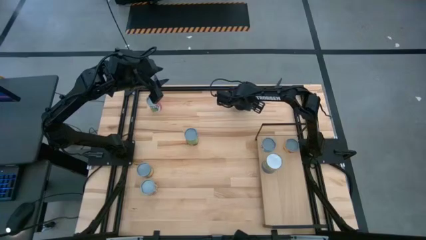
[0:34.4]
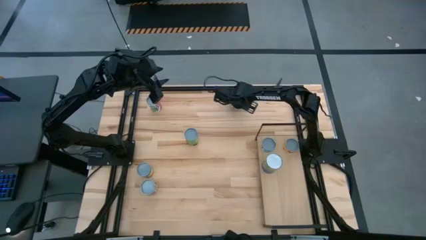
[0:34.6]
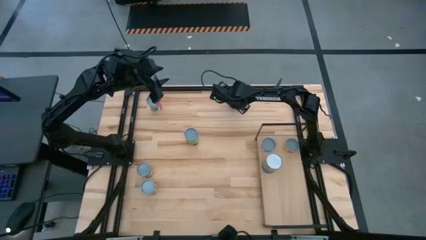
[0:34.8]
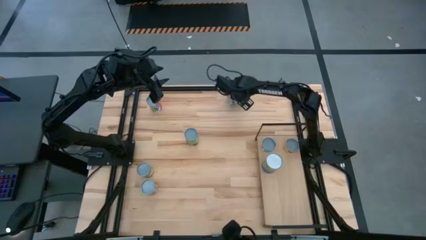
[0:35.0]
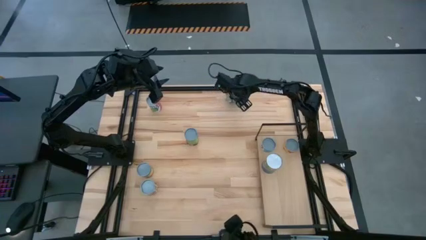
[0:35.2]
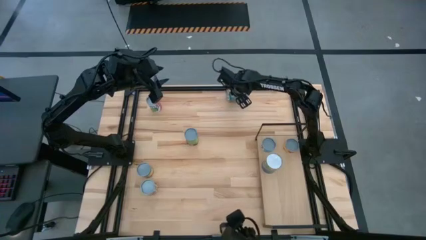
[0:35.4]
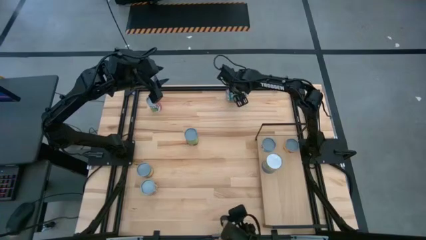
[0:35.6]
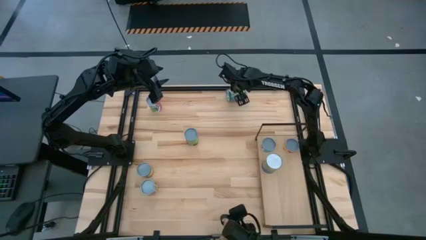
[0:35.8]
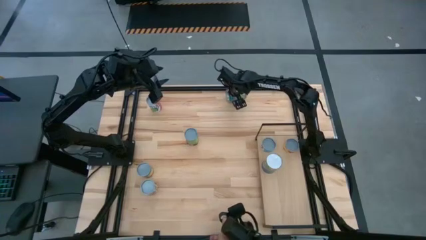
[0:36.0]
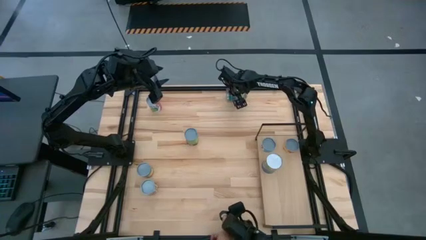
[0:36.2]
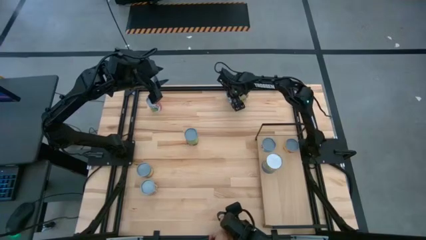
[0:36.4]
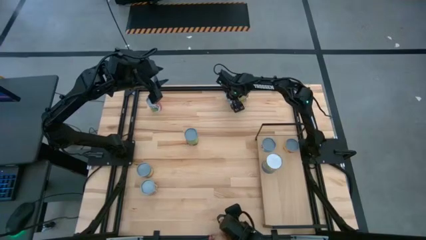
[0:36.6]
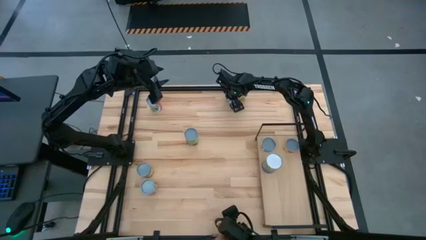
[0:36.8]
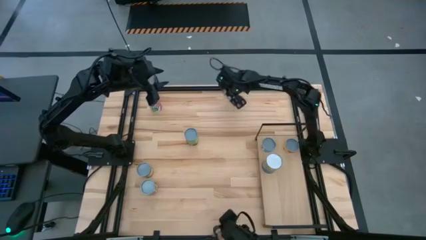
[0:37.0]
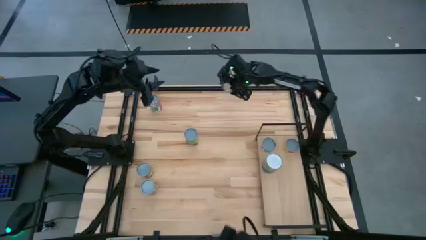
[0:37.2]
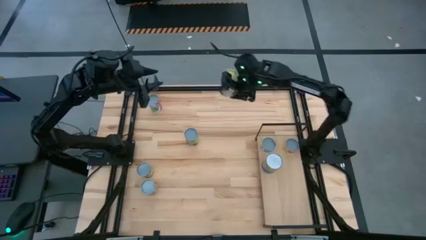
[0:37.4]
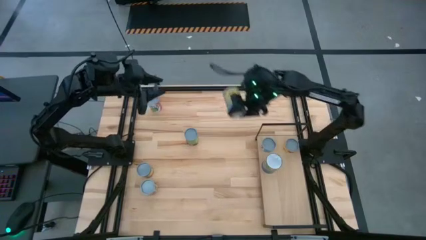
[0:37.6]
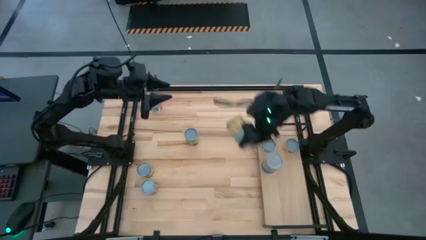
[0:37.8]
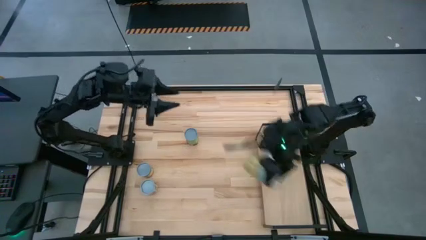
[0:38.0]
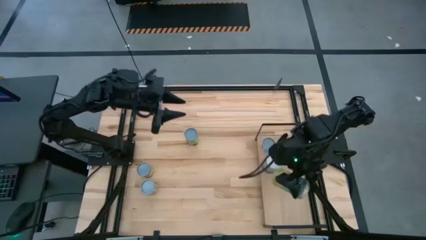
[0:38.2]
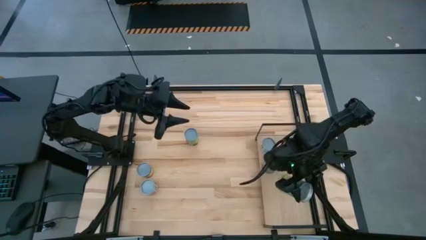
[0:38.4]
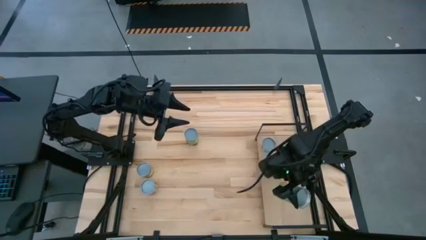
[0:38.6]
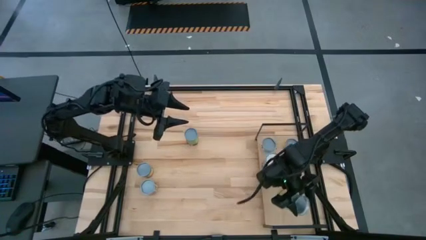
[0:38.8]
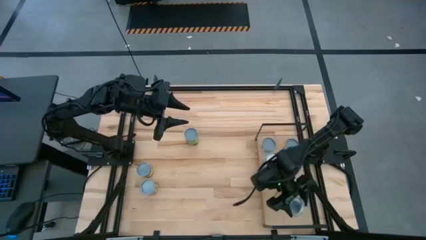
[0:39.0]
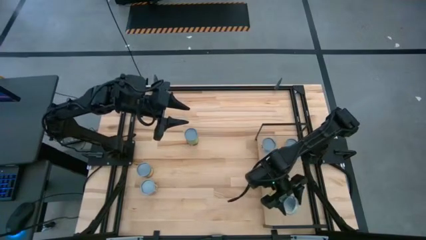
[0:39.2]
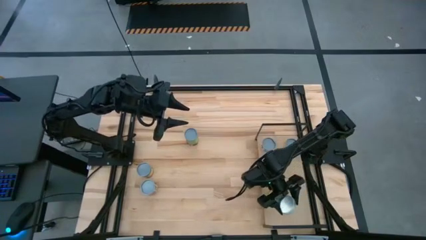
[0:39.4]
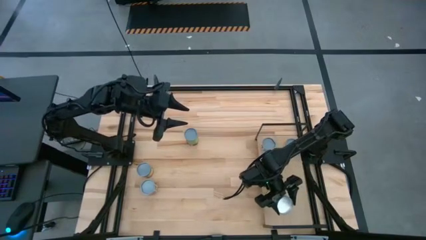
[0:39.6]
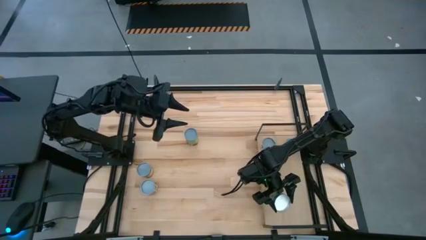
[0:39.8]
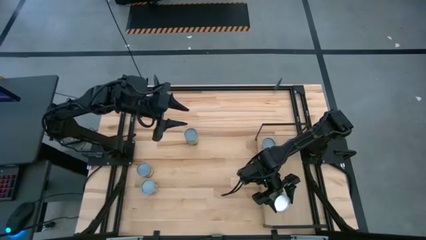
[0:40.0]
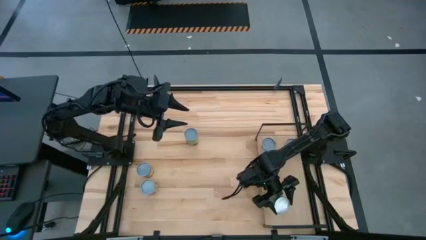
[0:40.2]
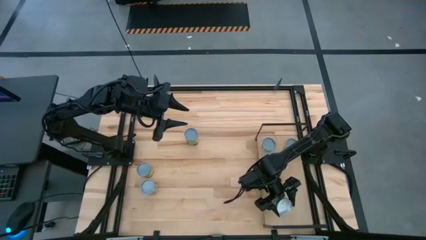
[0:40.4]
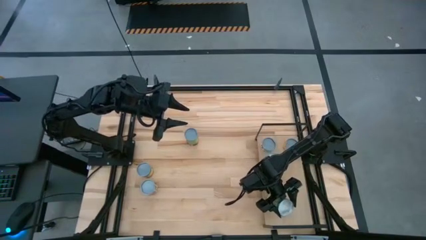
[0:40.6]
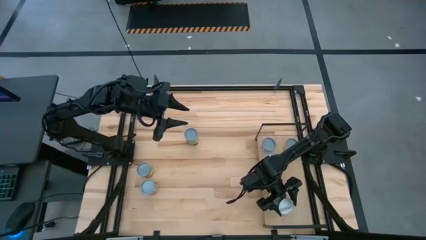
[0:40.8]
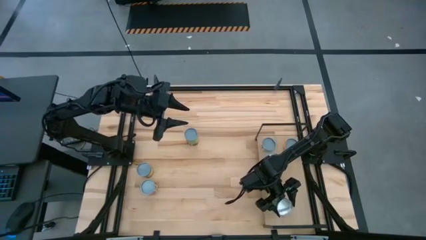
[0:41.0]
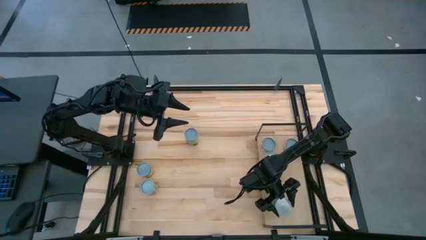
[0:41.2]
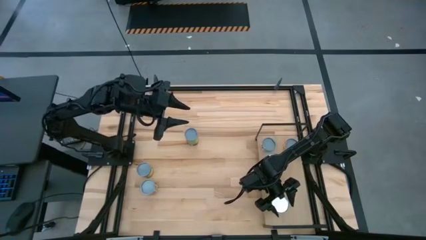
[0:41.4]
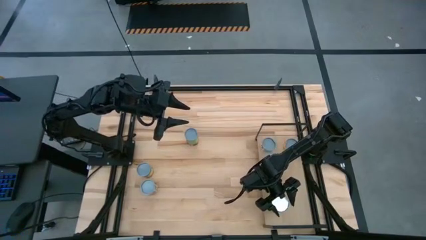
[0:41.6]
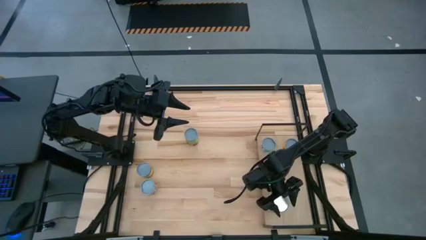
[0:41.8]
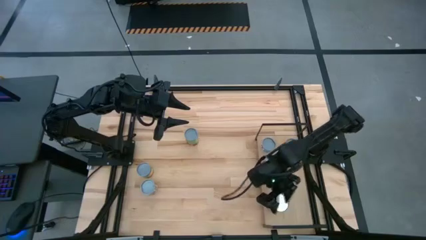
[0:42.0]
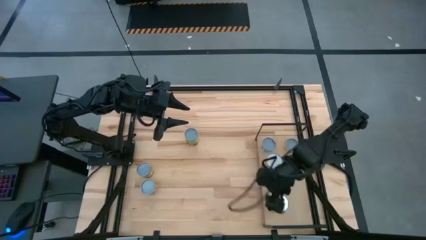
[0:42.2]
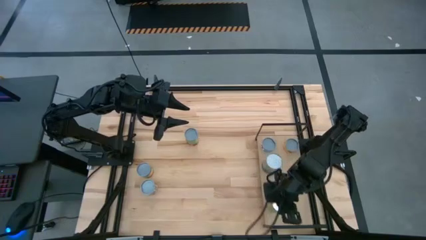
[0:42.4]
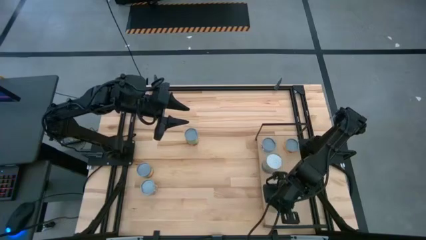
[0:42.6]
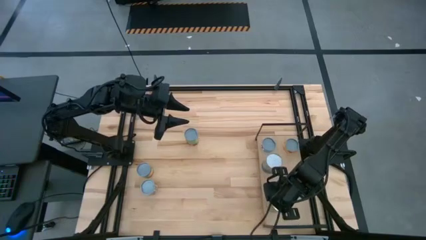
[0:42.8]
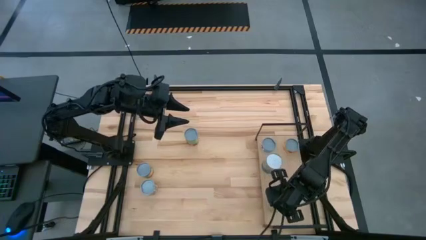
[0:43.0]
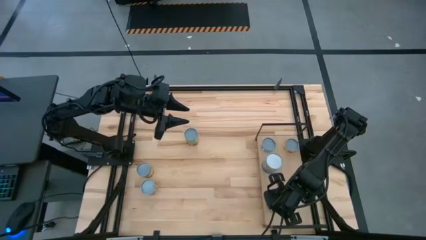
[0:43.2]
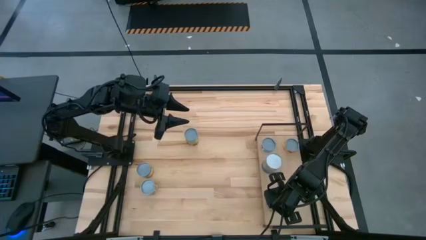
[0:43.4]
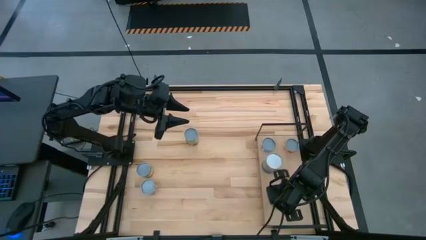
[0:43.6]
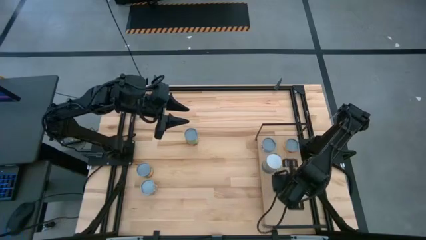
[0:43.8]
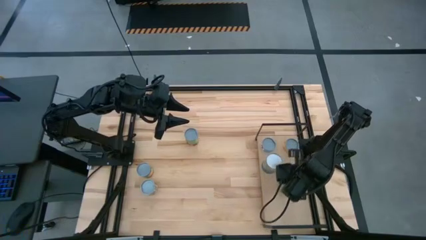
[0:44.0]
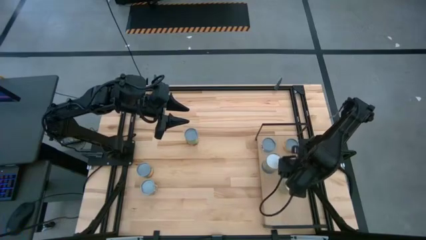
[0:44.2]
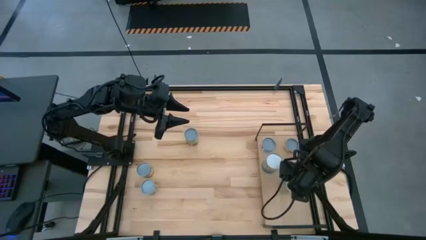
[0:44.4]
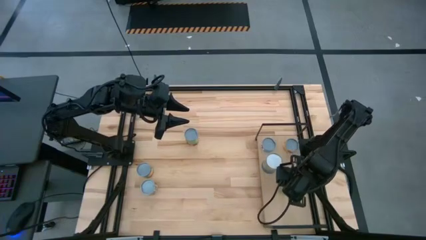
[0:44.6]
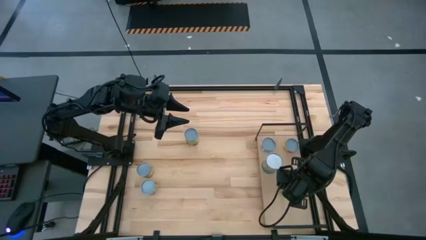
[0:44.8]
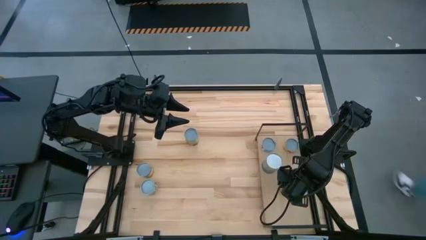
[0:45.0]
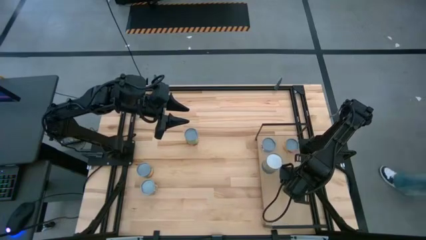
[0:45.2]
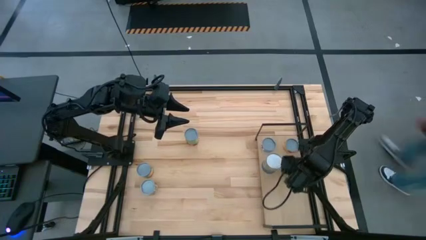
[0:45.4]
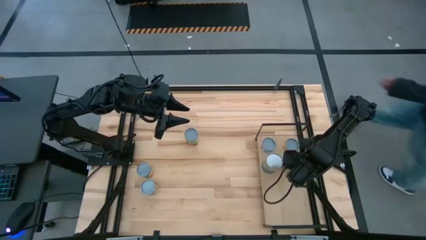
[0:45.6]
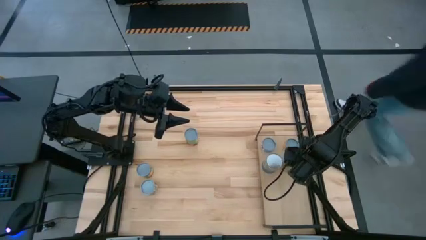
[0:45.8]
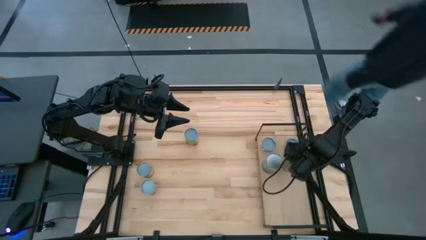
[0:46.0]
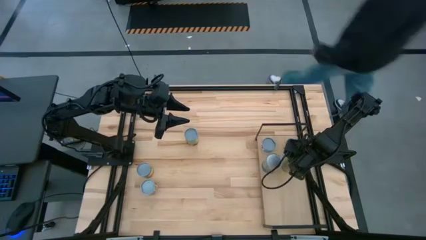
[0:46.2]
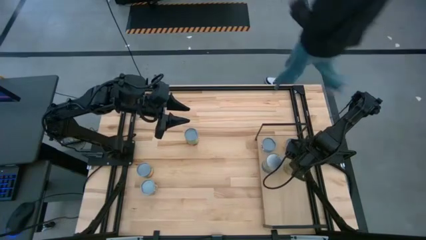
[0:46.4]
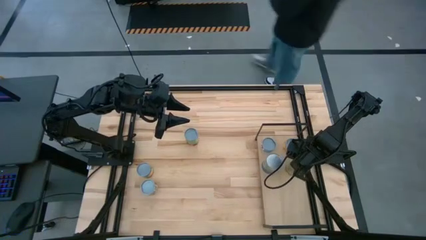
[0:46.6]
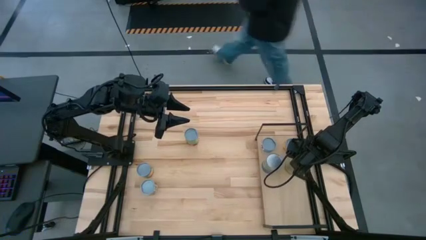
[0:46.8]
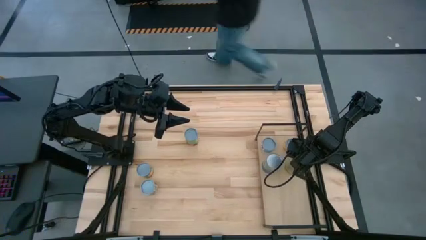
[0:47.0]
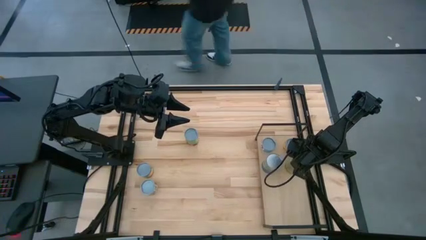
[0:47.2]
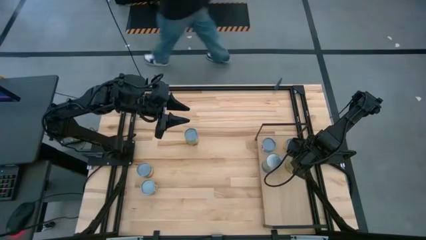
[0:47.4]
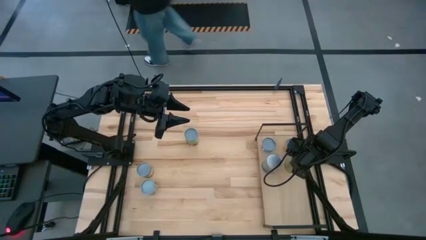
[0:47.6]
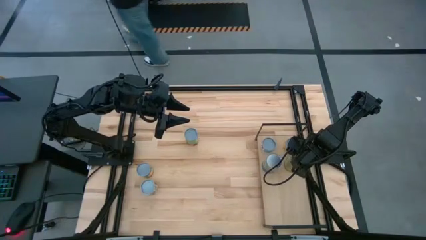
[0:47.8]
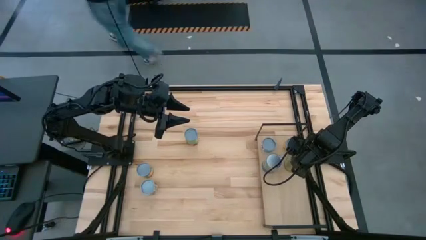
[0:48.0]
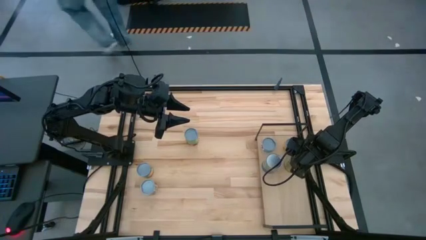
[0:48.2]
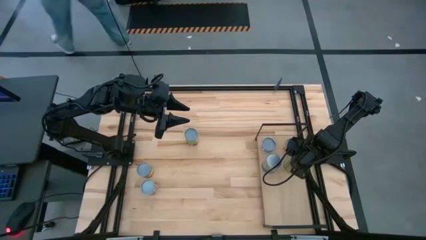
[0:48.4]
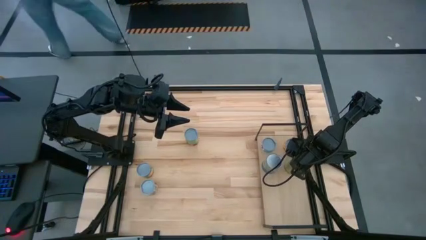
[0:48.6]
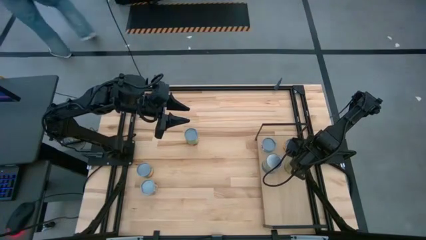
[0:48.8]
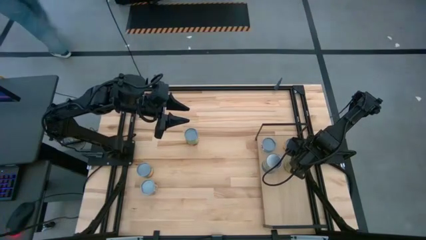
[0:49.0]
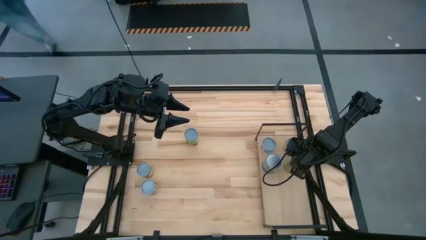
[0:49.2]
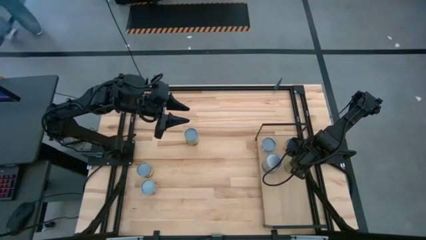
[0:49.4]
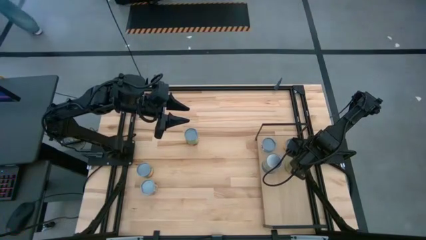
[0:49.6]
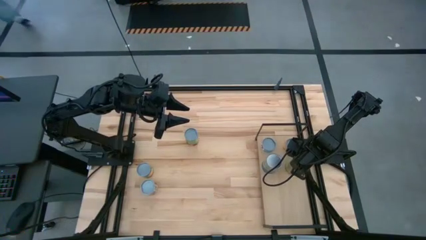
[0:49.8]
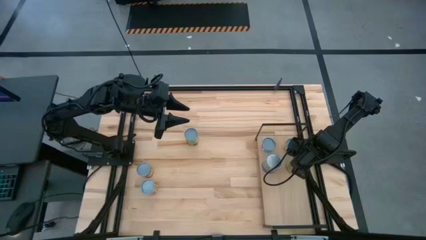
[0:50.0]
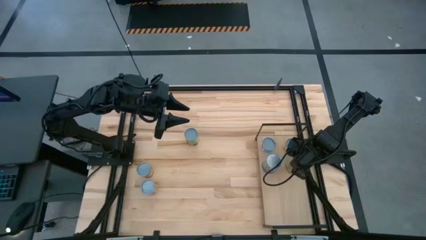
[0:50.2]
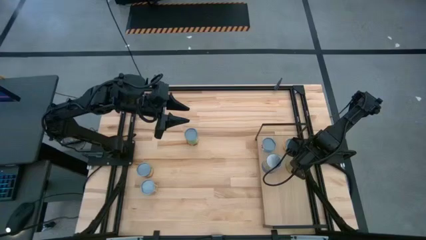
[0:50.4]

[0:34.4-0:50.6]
Task: Pick and place cans onto a shelf
Put the canned carrots on the shelf
